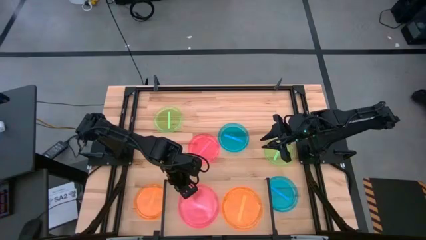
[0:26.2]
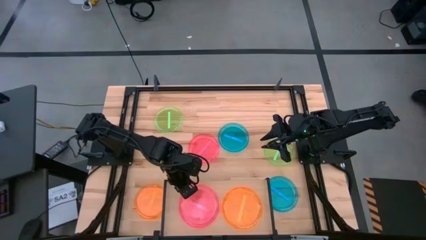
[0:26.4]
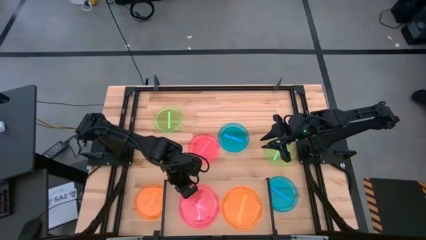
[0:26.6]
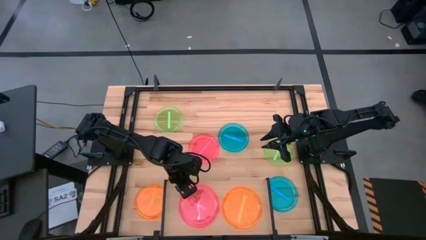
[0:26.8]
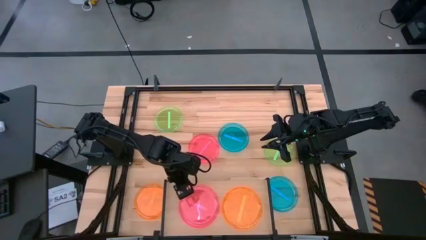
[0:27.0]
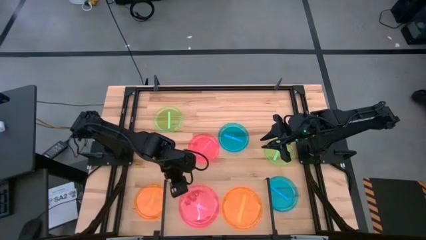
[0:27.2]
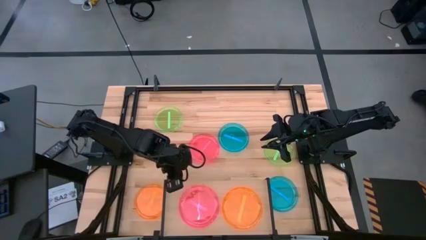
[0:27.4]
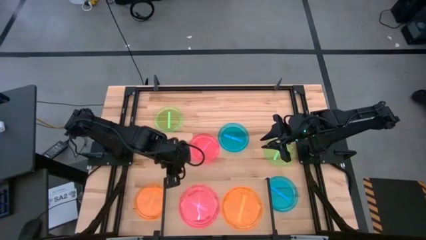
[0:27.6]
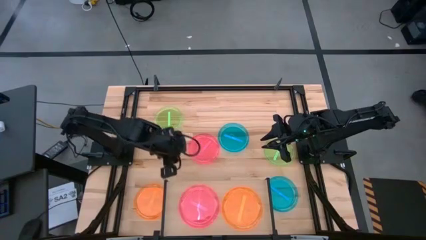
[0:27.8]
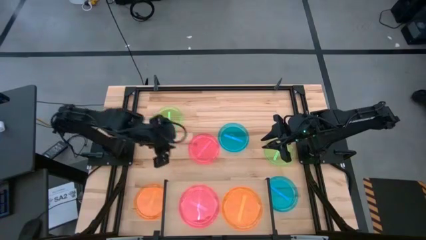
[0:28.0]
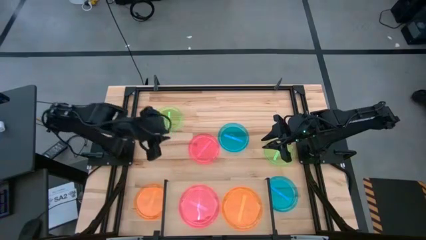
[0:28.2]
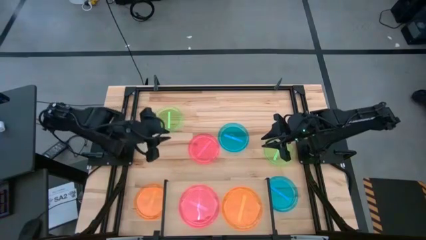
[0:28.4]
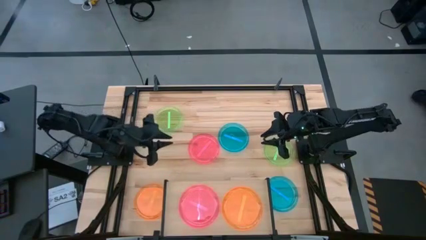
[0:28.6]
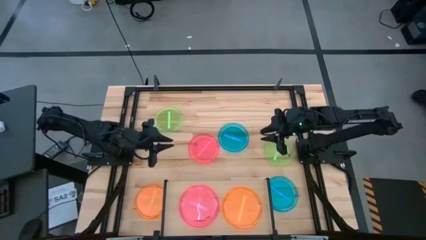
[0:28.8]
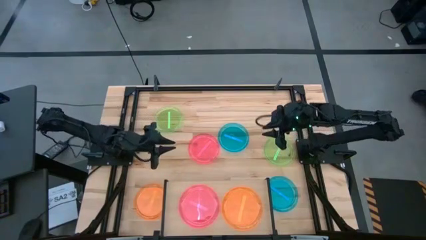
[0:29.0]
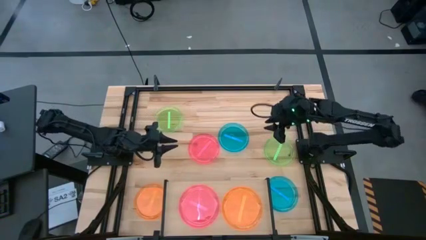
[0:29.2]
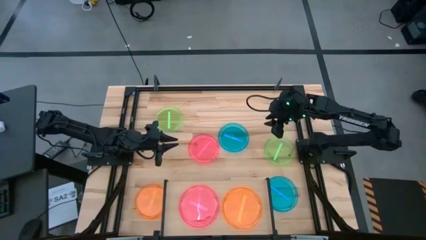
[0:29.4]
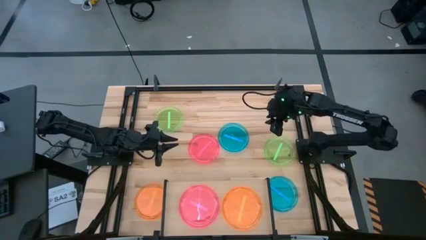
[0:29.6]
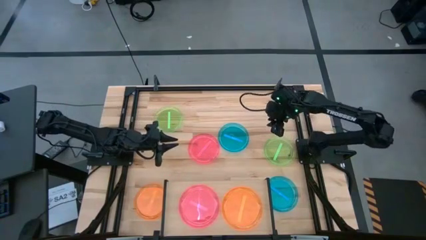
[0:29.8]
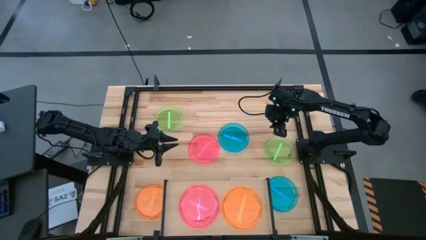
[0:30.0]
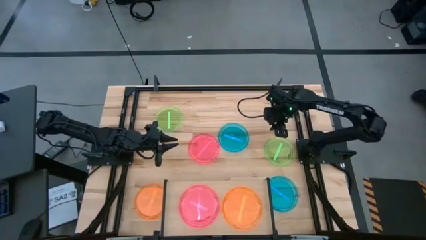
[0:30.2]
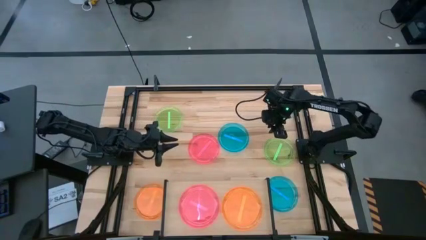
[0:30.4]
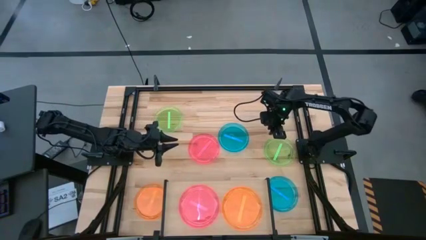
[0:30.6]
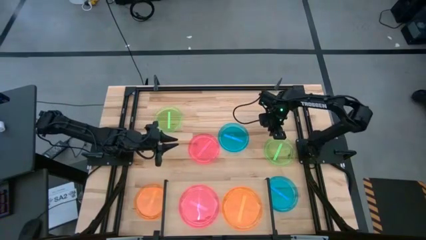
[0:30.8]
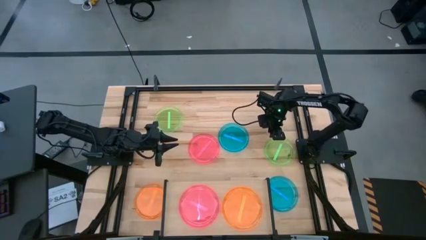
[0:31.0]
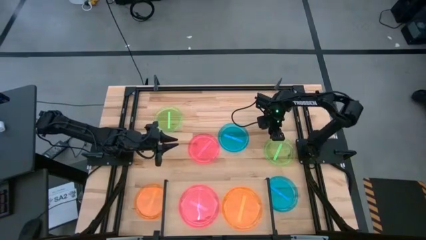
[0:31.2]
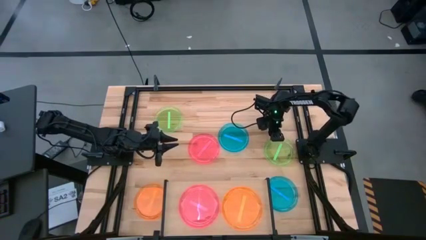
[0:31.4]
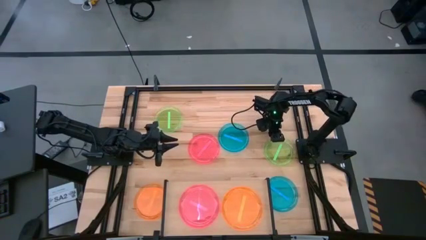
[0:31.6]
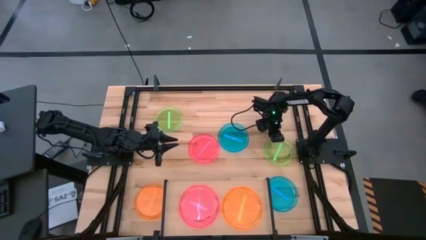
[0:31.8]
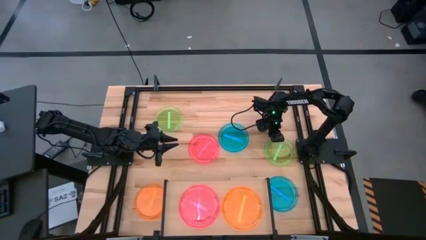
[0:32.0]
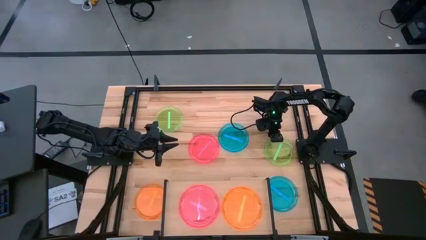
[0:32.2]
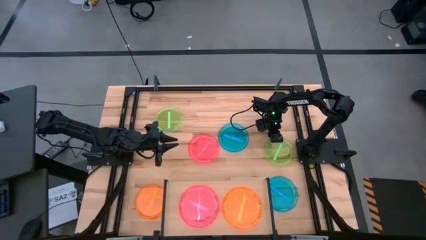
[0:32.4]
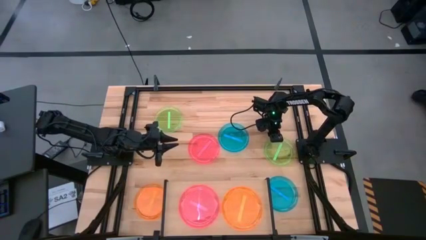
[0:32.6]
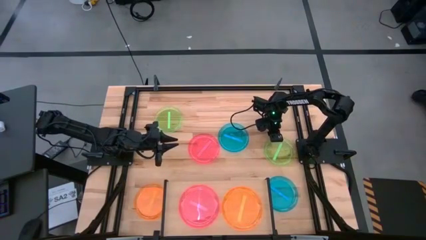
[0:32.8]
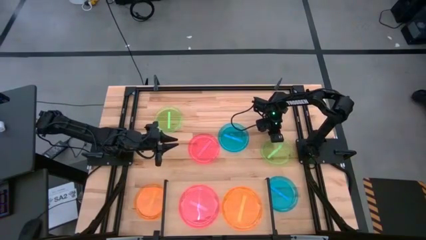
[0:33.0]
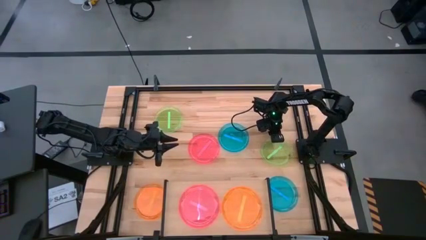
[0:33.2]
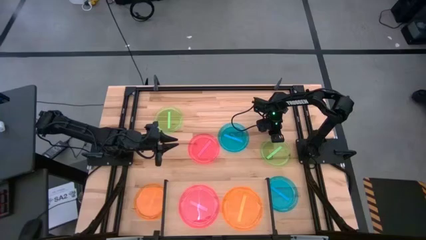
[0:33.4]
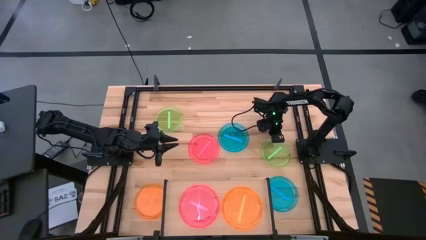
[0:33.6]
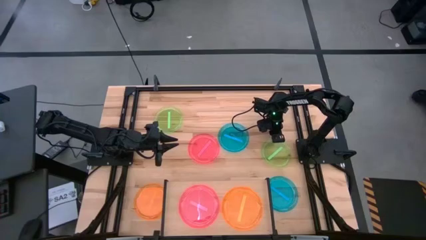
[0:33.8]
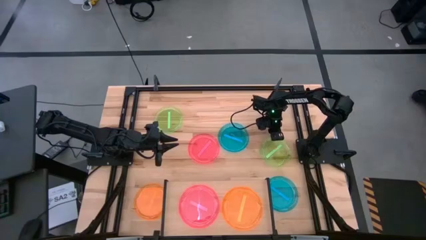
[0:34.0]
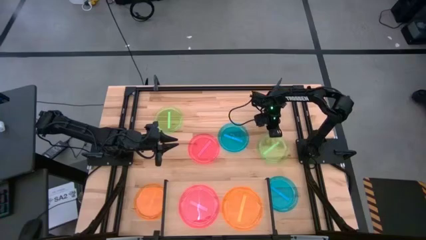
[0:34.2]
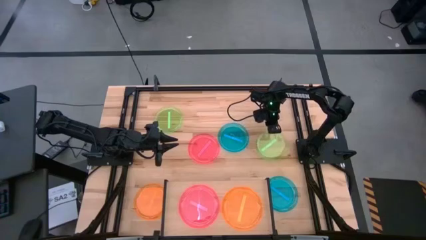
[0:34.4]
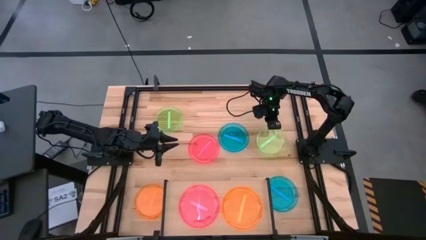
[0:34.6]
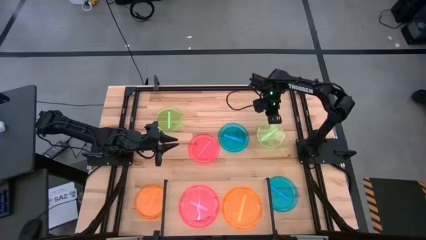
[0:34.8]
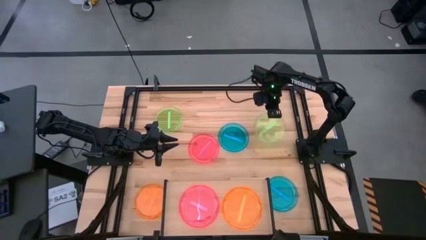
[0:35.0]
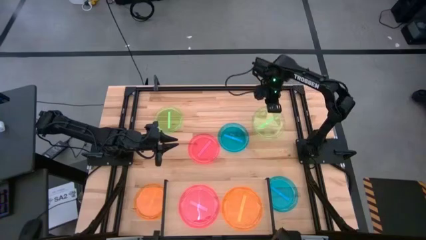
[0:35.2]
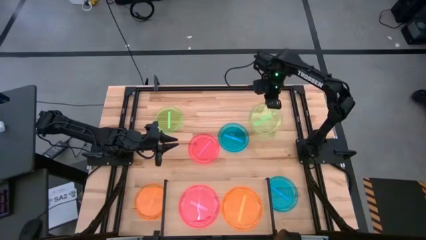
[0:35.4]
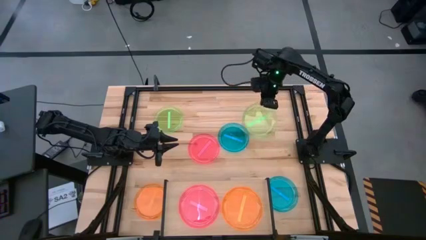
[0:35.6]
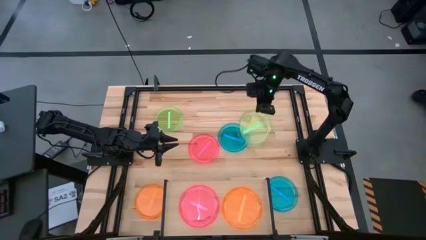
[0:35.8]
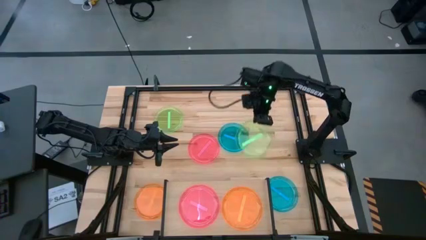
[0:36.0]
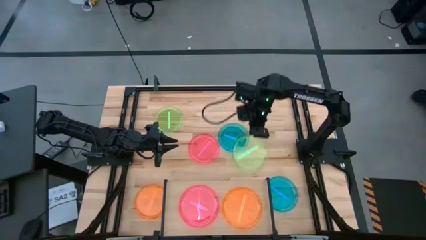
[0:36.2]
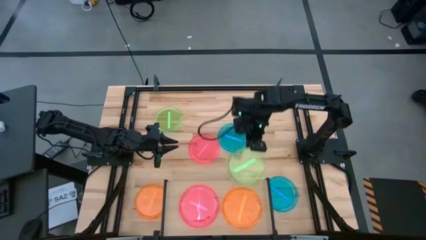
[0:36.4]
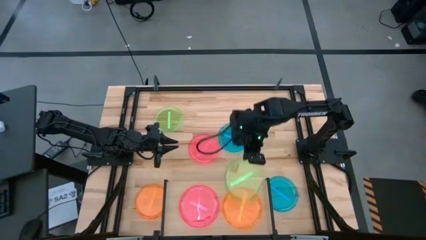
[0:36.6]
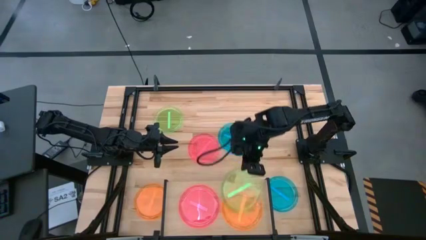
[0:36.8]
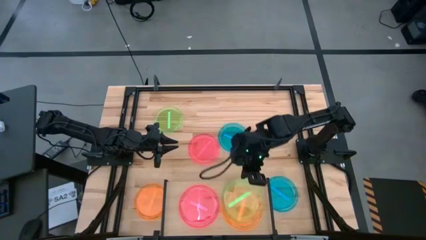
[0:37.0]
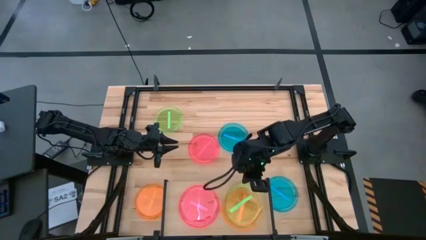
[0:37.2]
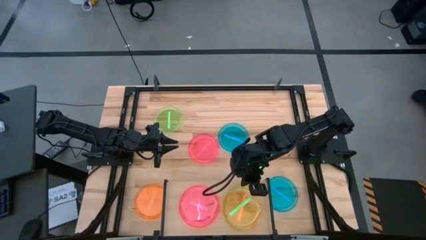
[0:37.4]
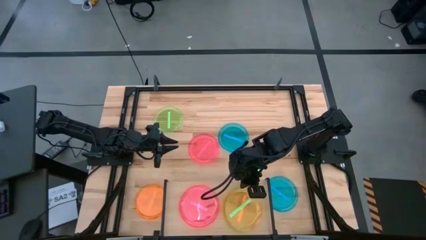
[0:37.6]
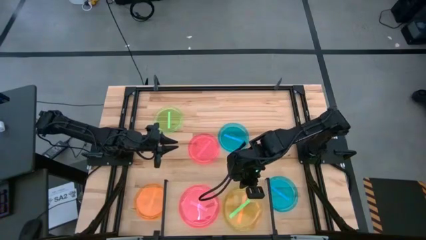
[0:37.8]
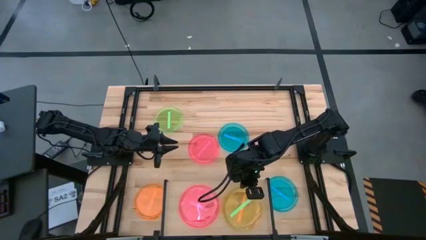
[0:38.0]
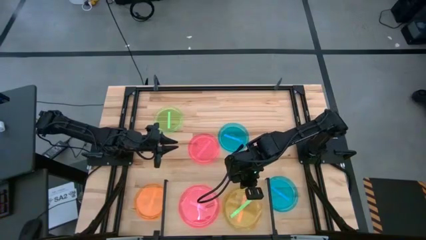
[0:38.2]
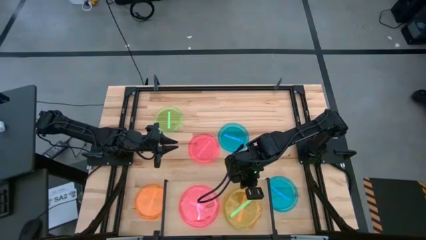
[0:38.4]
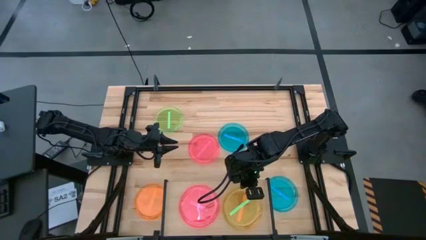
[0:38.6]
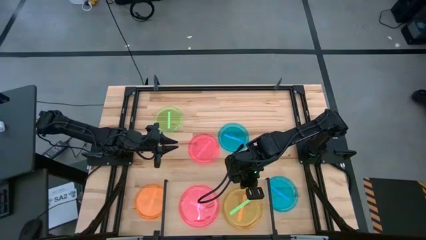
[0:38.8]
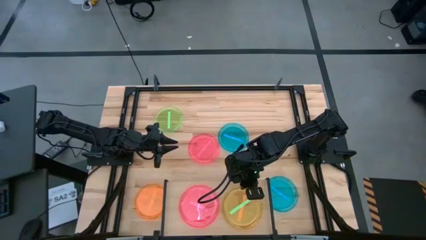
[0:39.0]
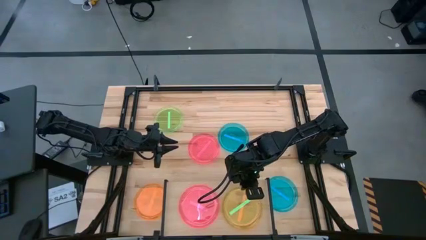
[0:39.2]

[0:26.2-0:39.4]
Task: Place and stack plates onto a shelf
Stack the right green plate on top of the orange plate
